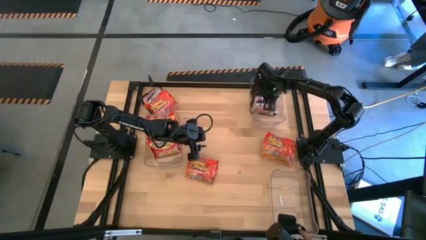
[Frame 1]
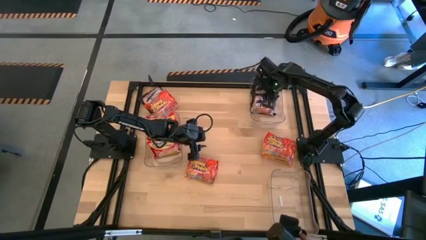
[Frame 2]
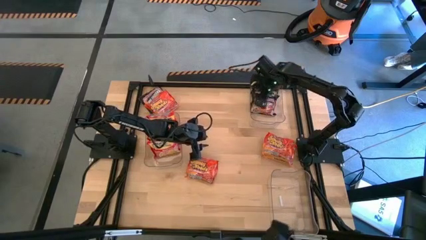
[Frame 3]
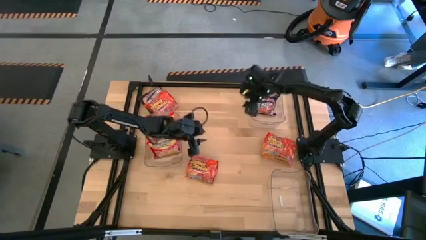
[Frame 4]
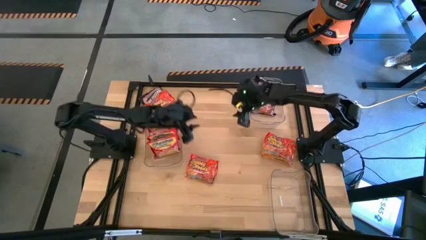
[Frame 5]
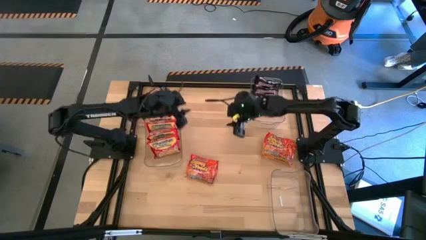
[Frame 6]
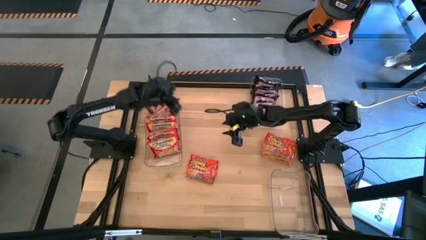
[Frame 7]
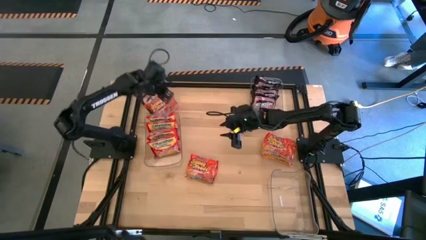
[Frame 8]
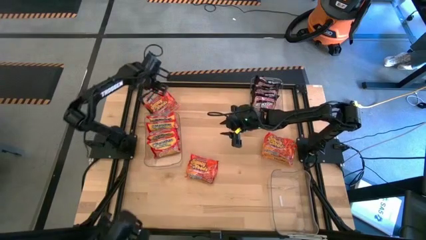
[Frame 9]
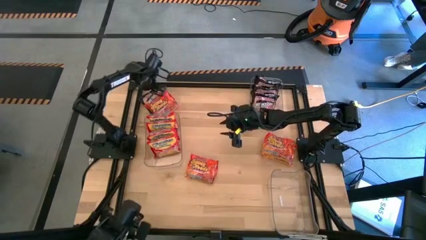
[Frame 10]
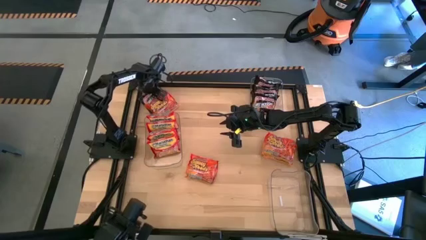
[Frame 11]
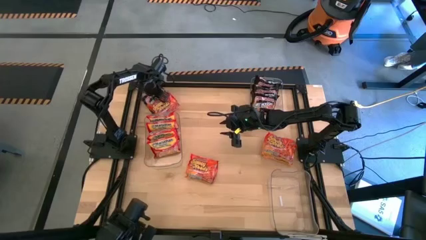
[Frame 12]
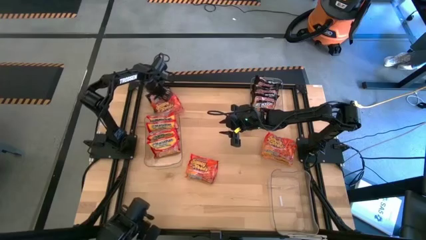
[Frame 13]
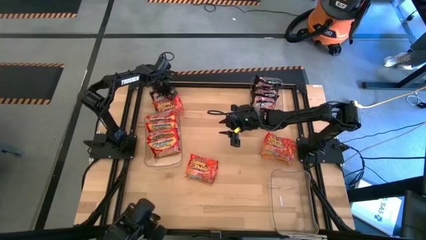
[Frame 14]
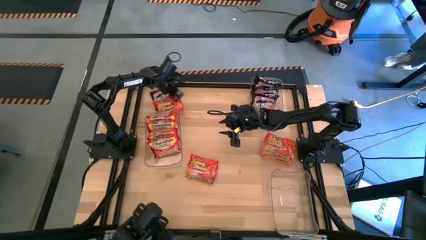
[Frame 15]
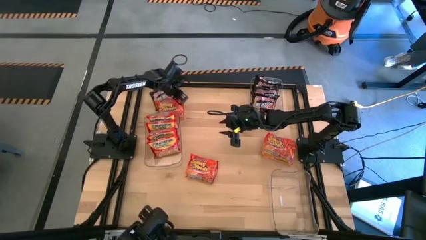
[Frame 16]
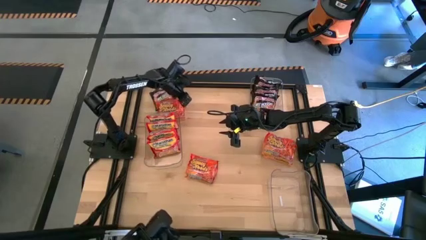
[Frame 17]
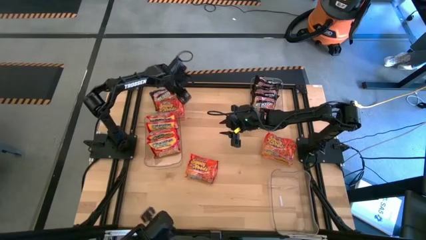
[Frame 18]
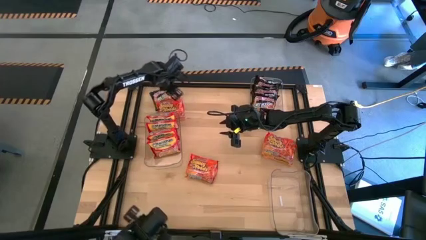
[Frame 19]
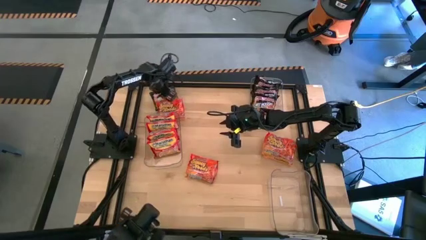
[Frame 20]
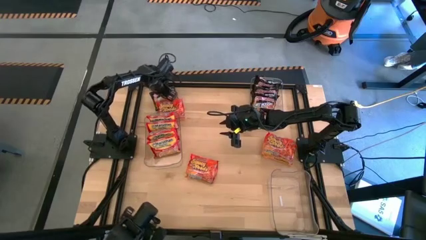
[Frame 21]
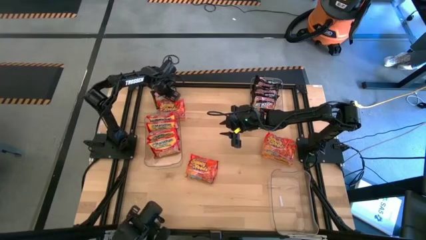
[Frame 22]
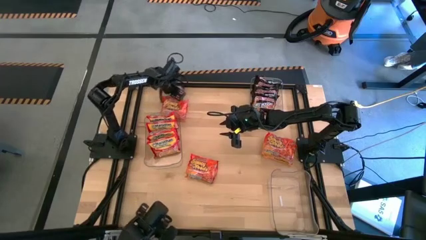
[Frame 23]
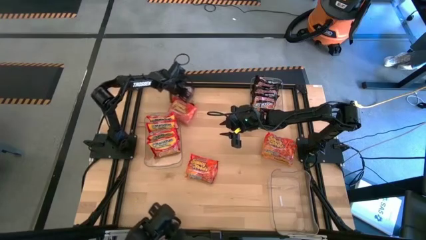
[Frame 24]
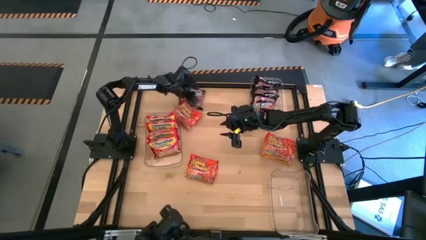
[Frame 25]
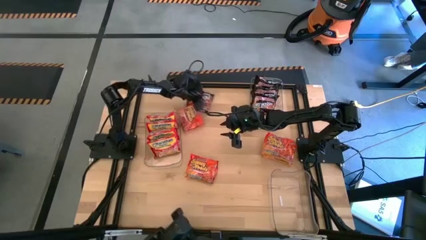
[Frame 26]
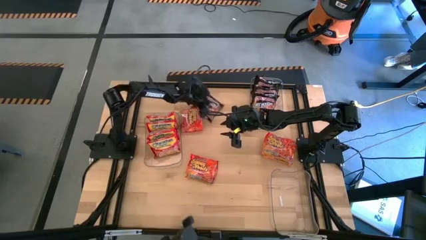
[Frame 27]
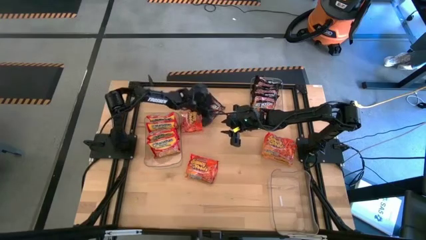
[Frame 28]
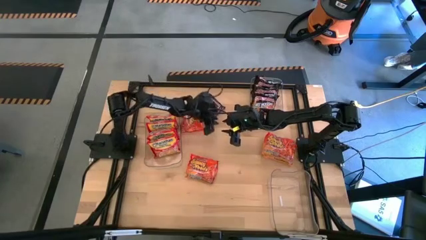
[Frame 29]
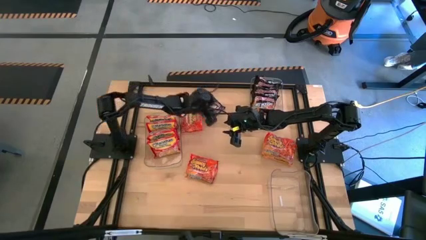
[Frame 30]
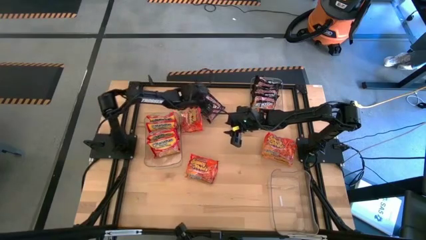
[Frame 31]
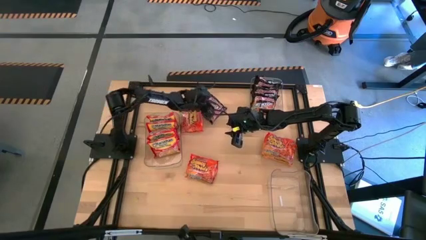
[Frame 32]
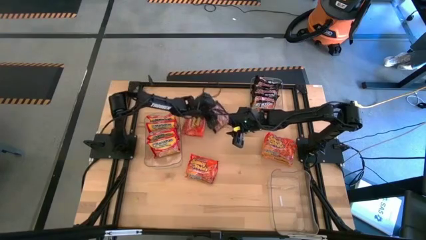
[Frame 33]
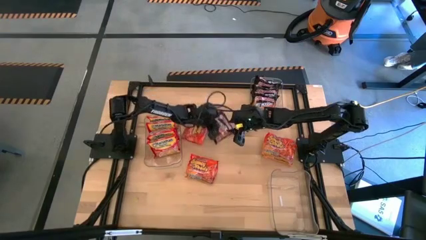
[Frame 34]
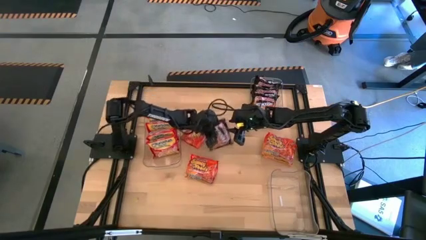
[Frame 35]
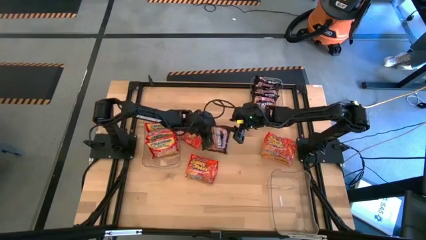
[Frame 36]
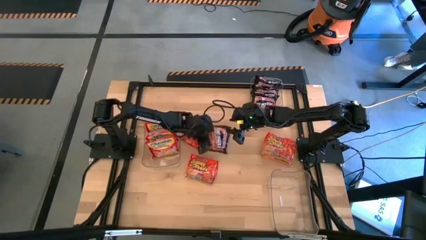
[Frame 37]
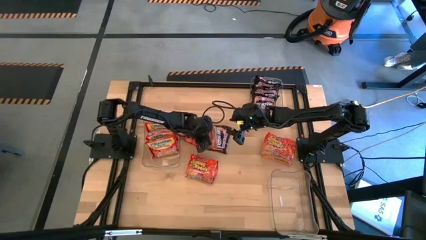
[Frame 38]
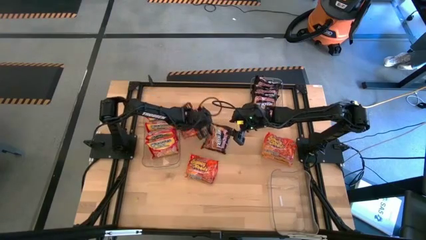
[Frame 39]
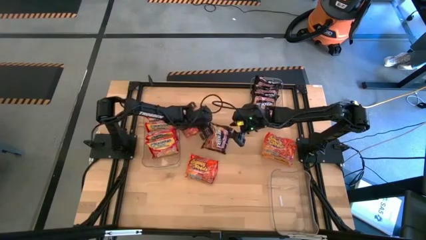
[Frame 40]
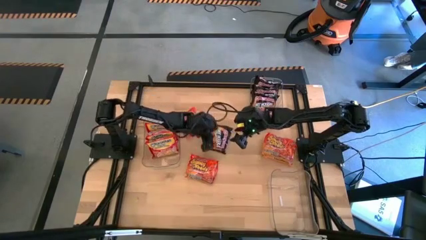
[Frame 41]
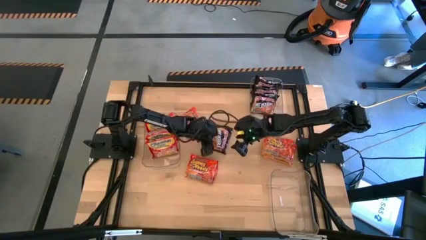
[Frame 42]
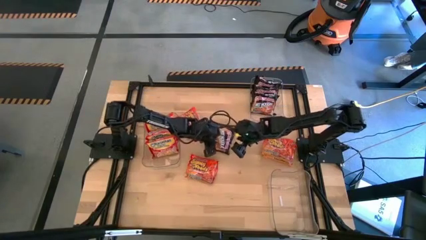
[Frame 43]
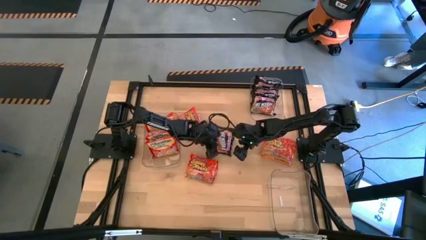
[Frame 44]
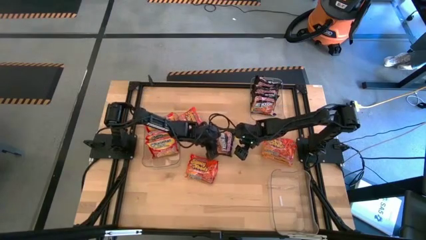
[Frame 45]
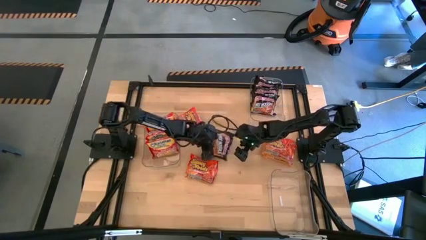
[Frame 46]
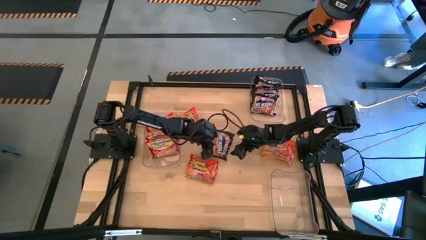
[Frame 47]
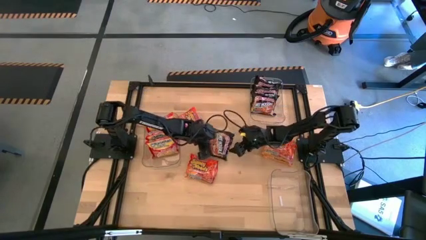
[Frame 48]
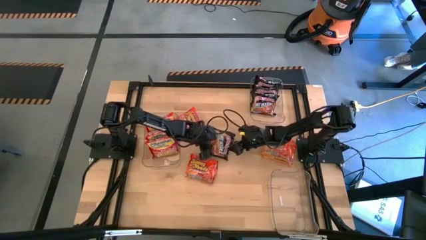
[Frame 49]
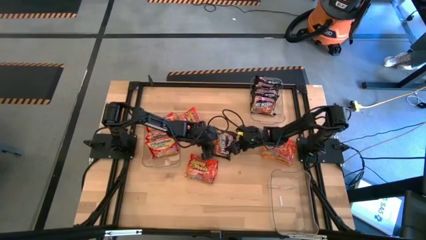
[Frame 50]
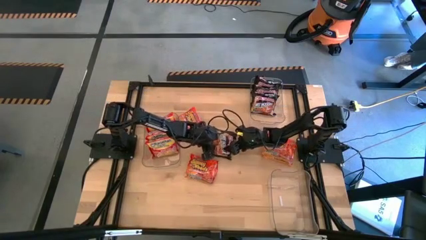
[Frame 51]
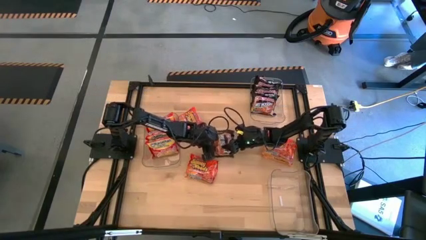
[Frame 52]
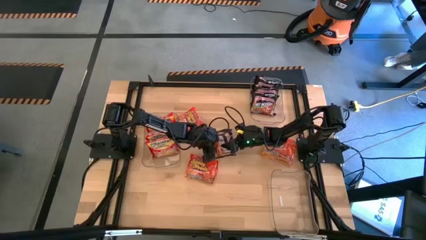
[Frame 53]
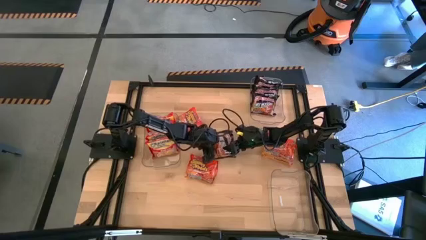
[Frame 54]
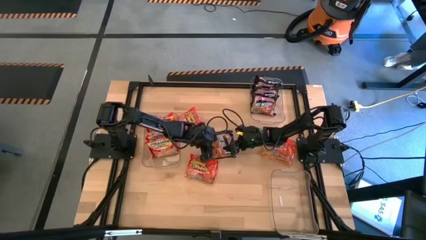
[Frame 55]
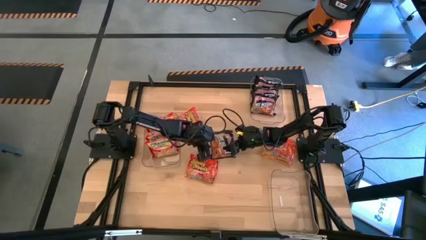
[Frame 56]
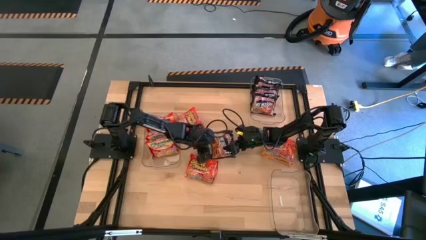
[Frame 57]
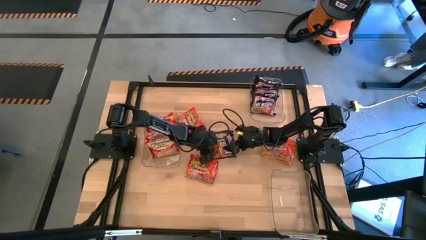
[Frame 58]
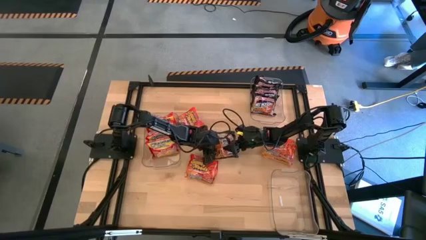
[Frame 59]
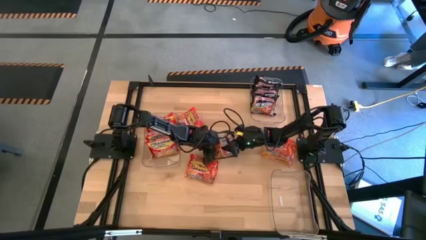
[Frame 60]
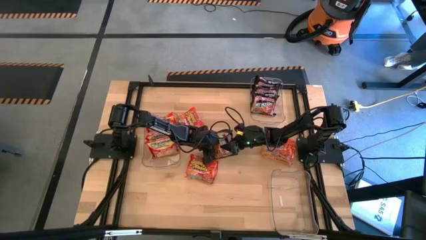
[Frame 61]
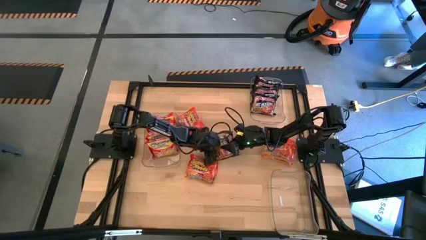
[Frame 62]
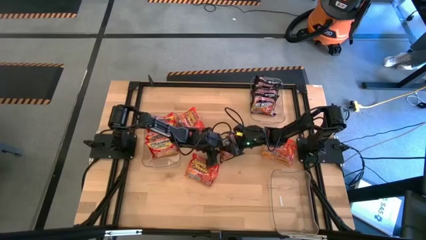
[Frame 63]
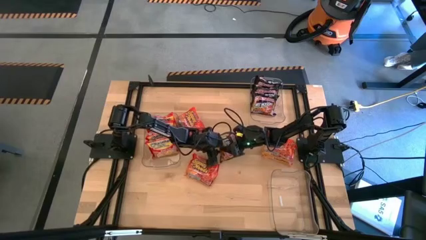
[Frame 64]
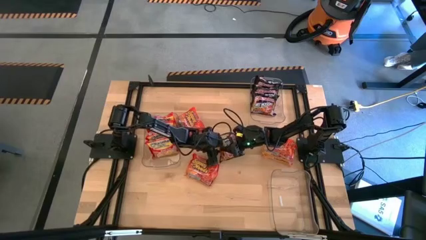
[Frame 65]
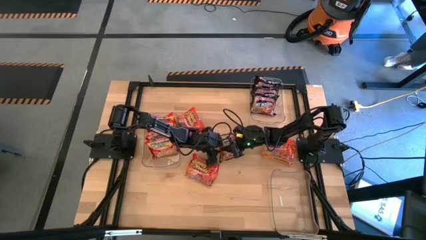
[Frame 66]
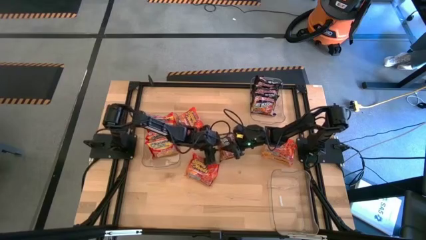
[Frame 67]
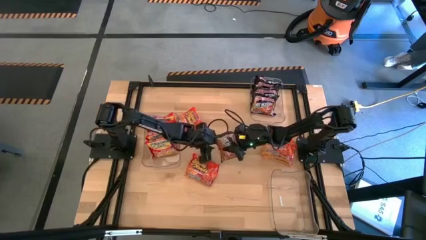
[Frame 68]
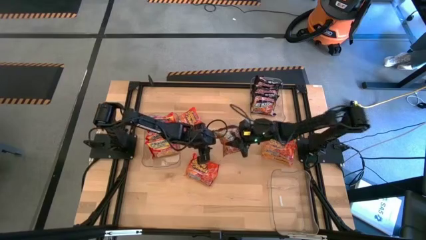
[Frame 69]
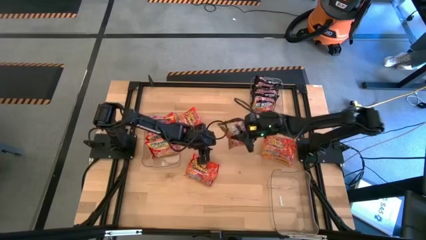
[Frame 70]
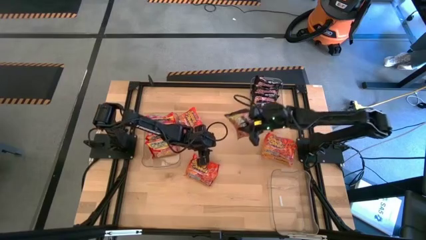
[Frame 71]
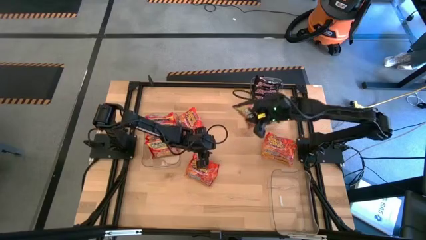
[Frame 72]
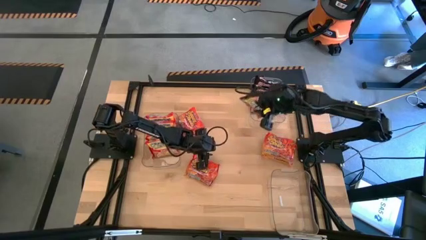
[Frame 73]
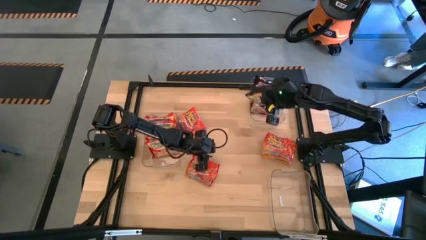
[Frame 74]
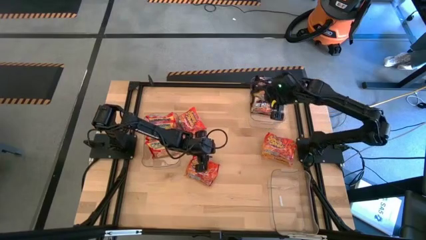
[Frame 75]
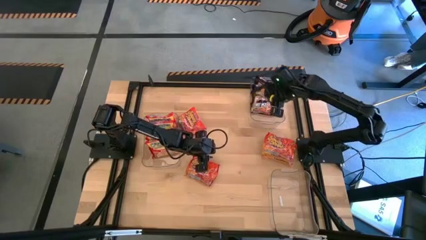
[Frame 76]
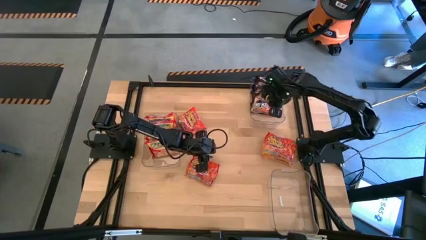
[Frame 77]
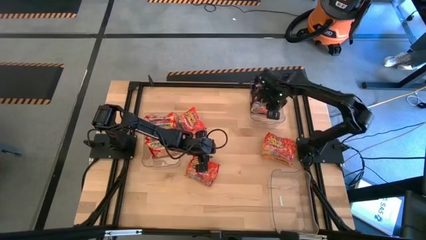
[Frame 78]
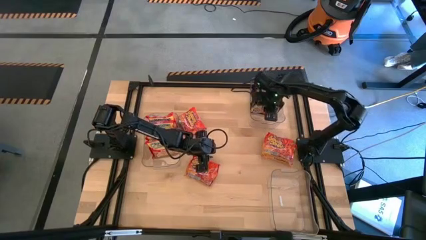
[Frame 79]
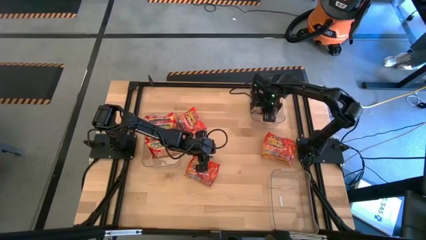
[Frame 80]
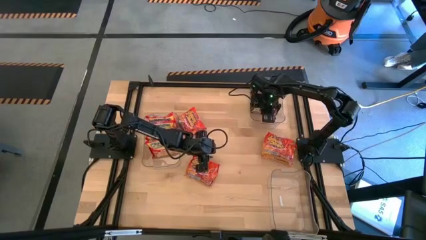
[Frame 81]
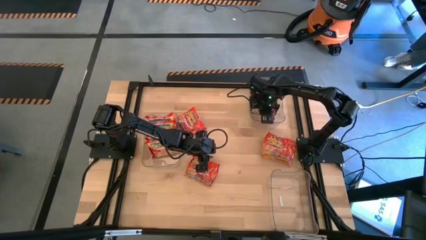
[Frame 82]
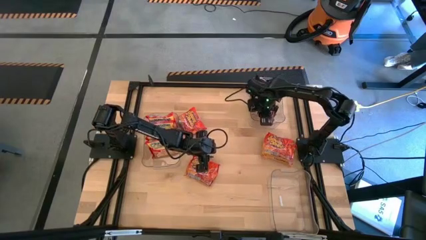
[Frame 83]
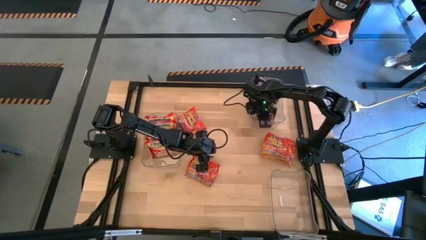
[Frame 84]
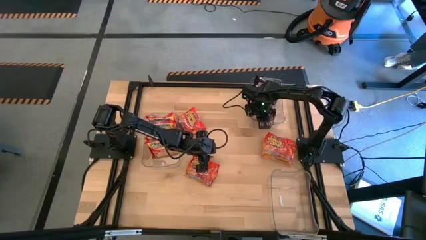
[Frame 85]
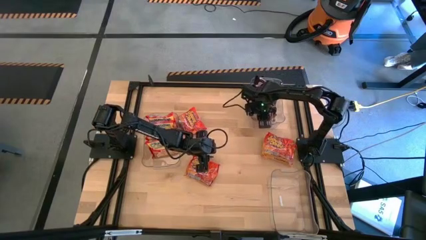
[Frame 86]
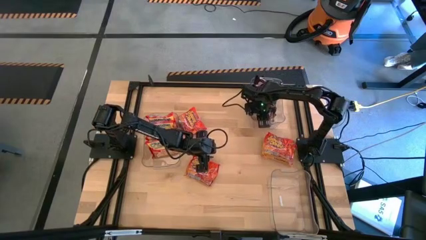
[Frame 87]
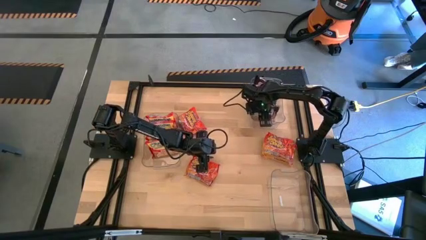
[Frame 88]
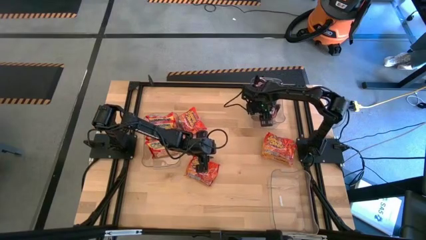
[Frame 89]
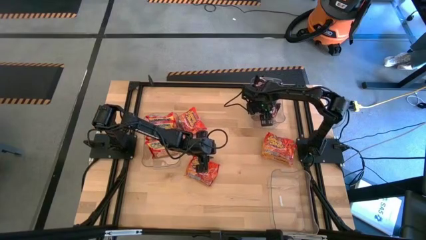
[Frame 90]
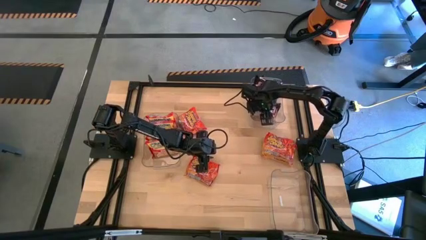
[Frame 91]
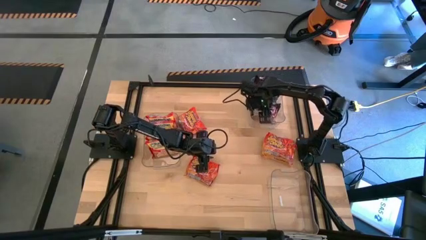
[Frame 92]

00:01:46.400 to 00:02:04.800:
Task: Sort Maruchan noodles
Put the black noodle pack into the top transparent bin
